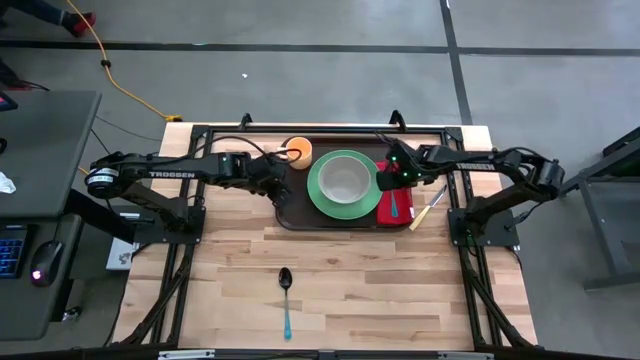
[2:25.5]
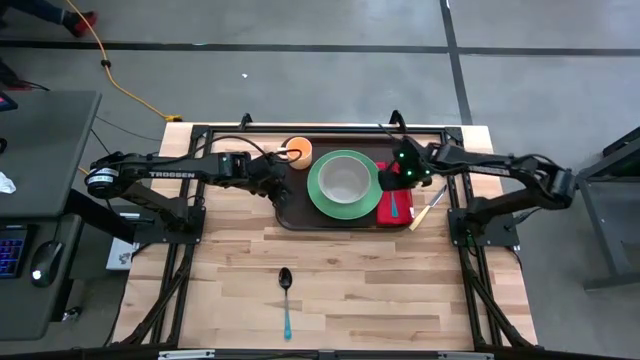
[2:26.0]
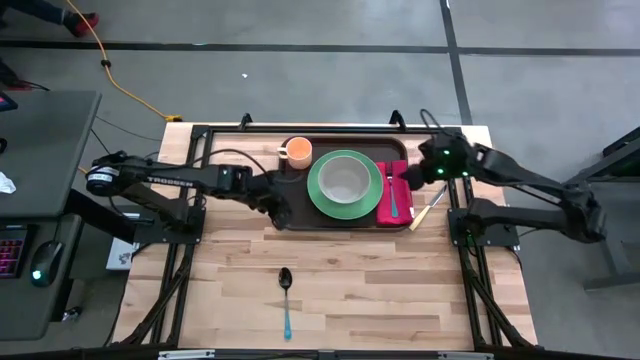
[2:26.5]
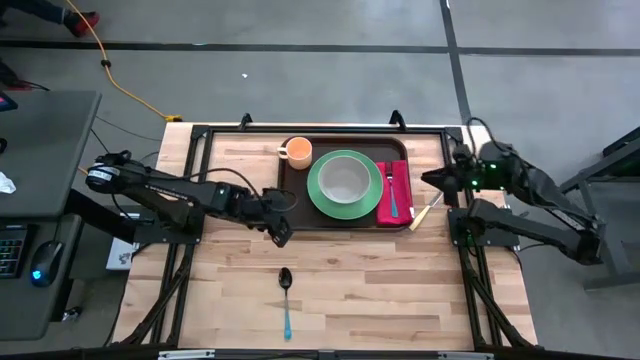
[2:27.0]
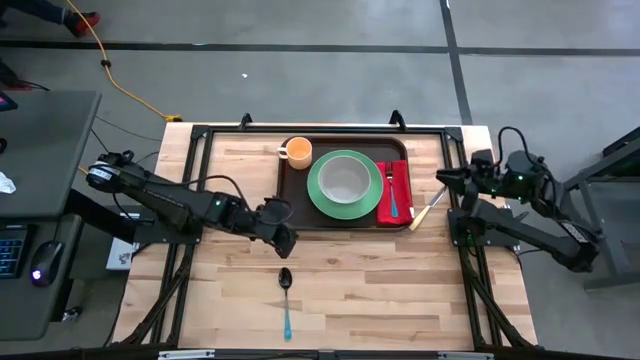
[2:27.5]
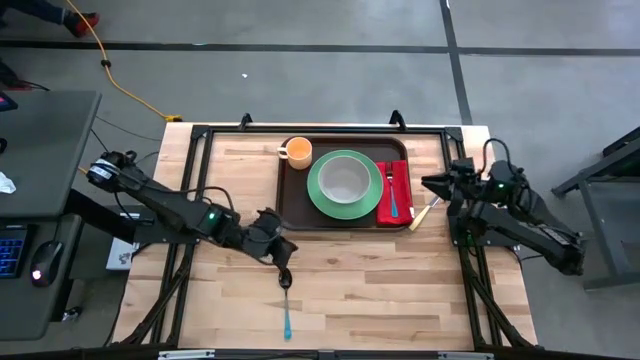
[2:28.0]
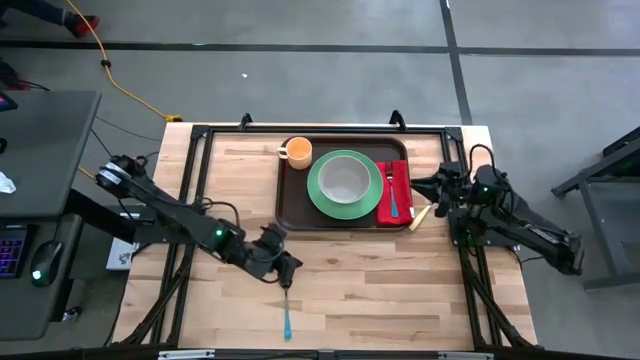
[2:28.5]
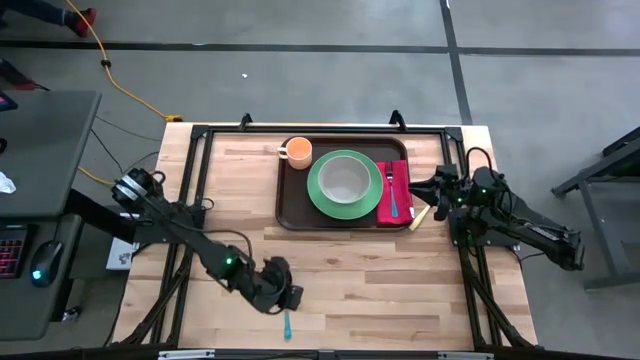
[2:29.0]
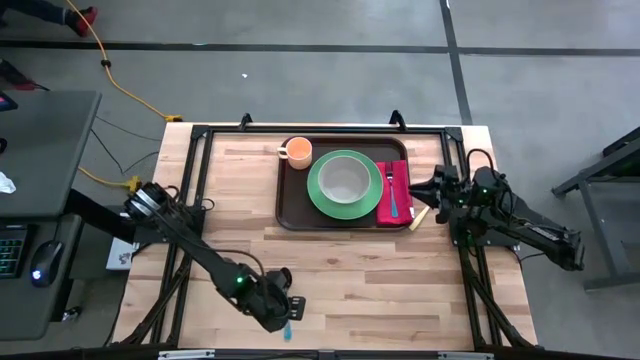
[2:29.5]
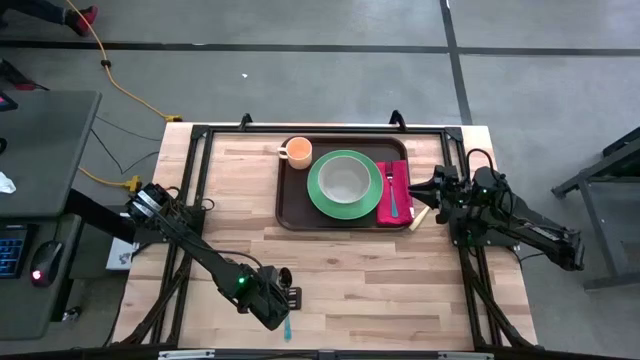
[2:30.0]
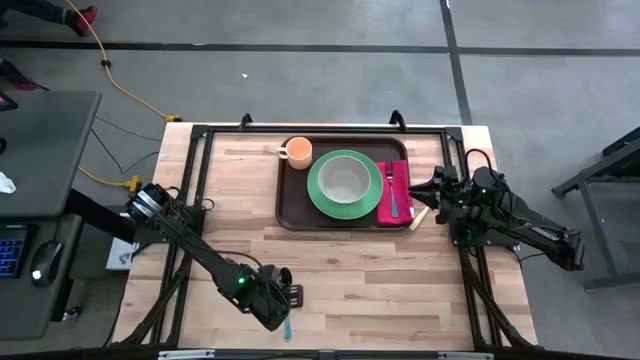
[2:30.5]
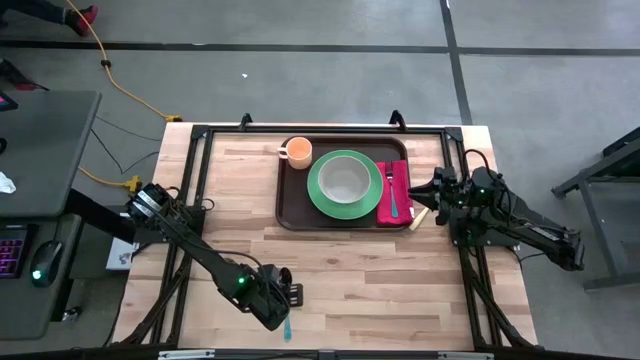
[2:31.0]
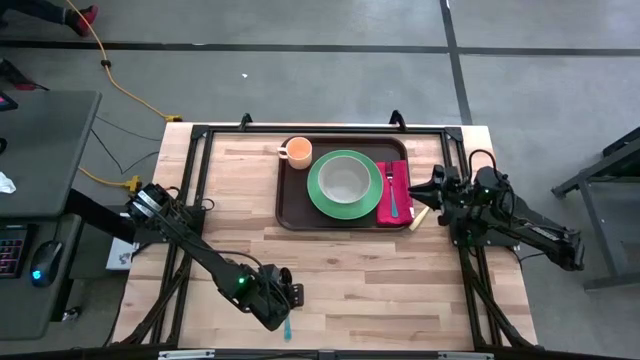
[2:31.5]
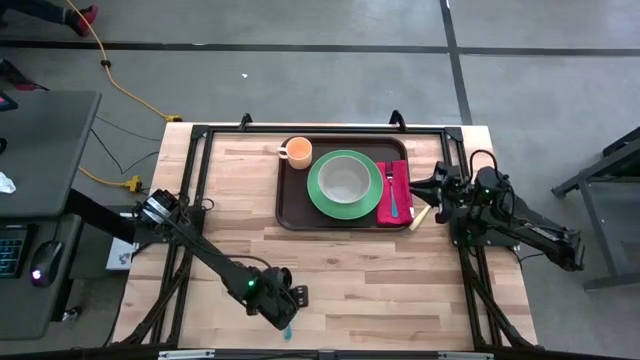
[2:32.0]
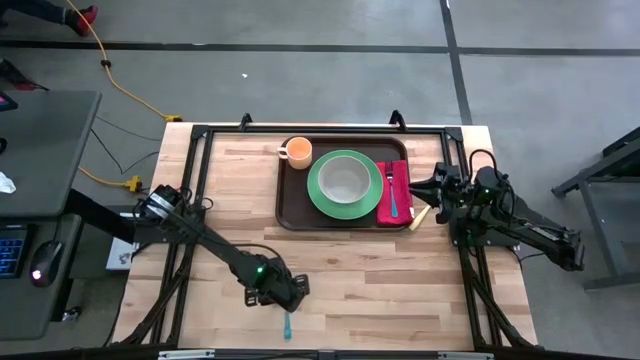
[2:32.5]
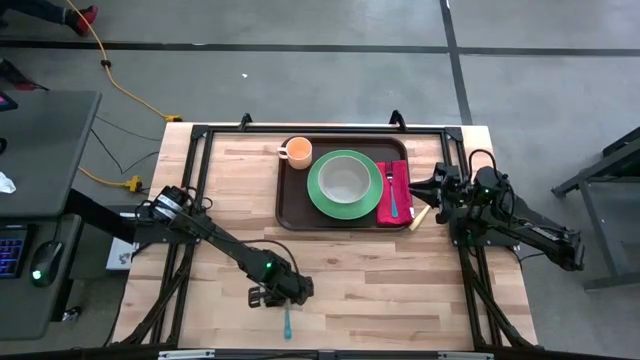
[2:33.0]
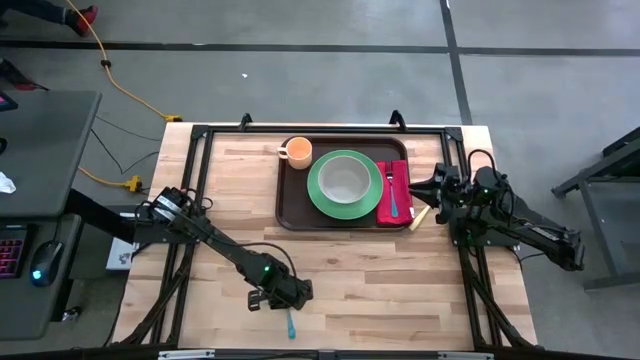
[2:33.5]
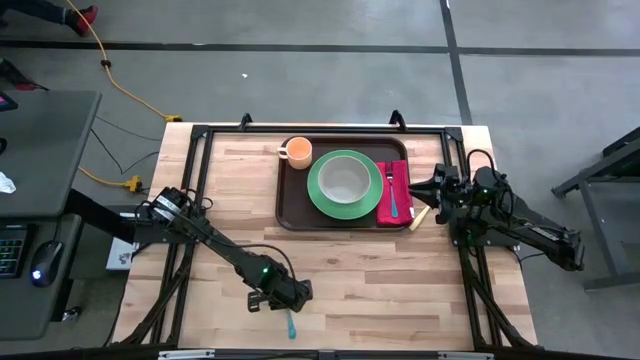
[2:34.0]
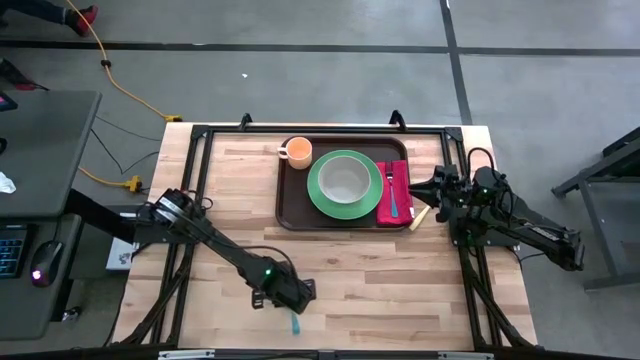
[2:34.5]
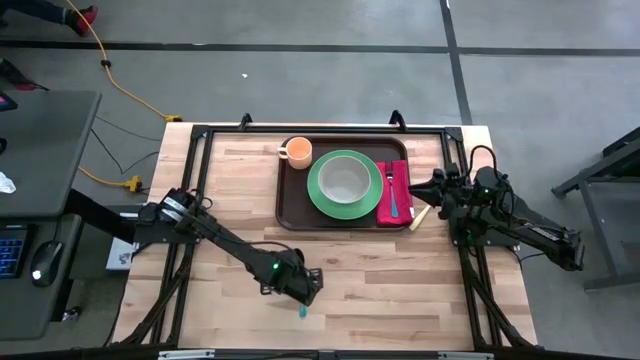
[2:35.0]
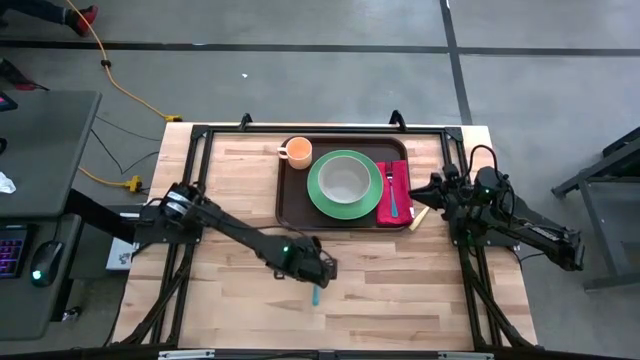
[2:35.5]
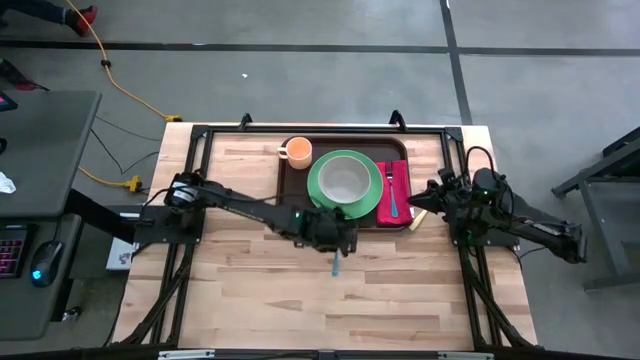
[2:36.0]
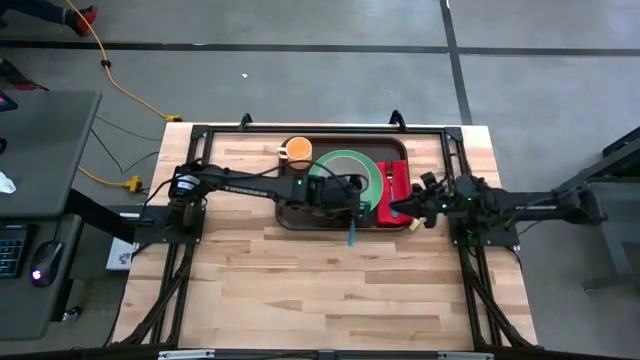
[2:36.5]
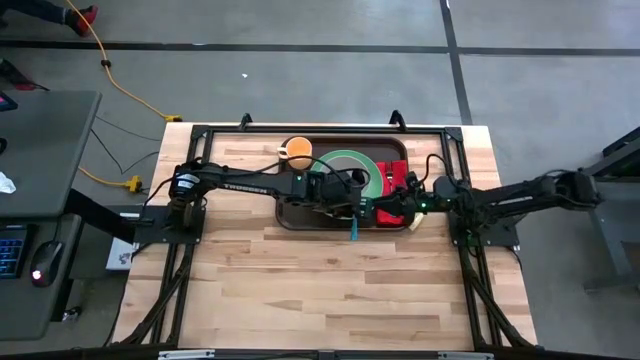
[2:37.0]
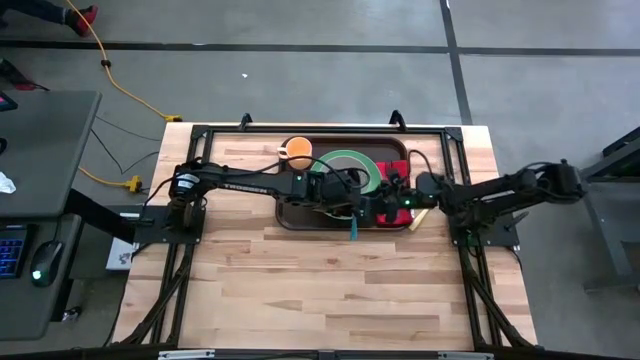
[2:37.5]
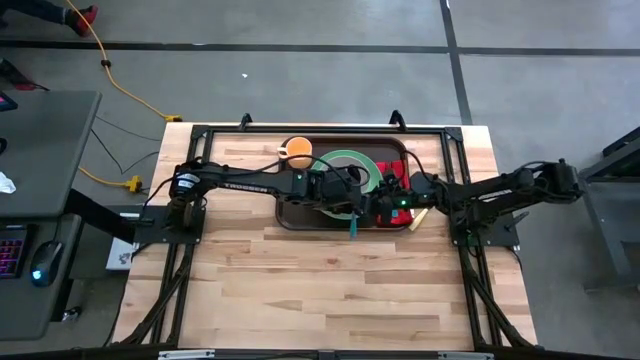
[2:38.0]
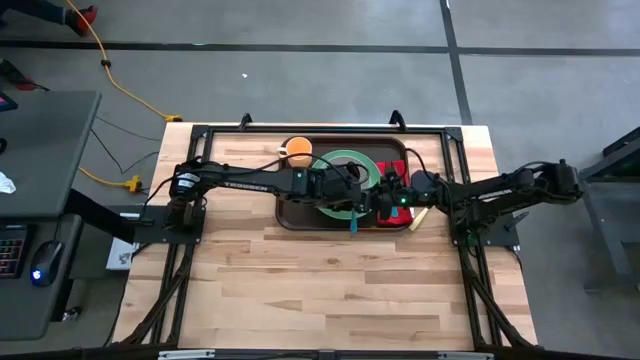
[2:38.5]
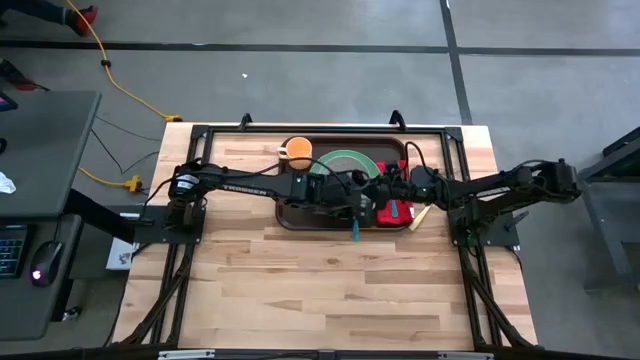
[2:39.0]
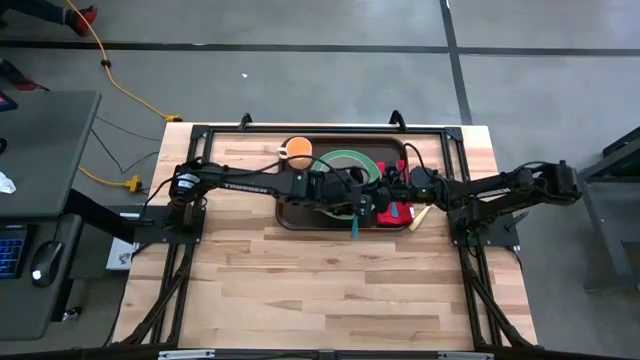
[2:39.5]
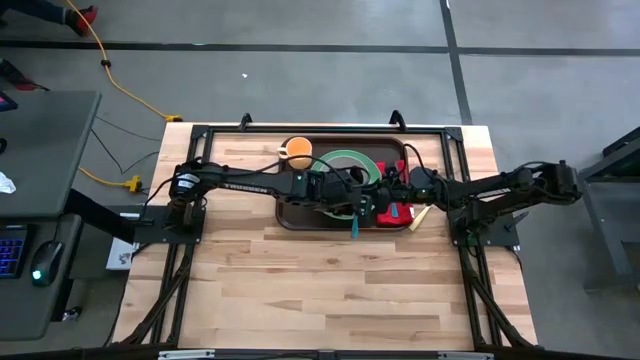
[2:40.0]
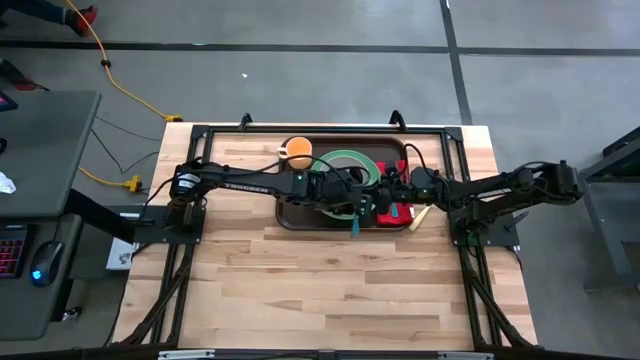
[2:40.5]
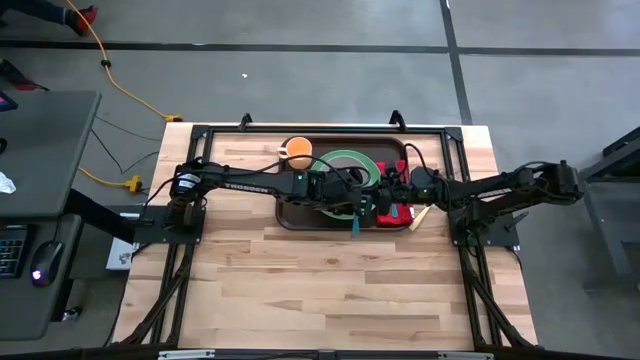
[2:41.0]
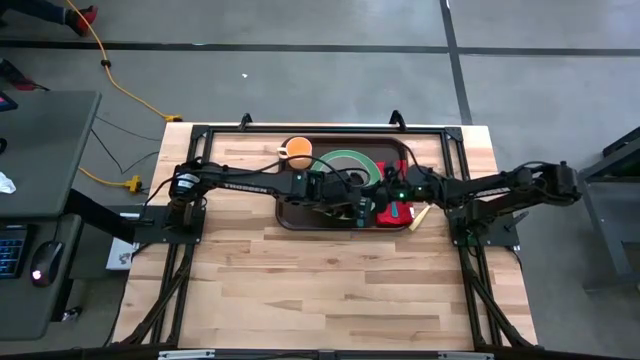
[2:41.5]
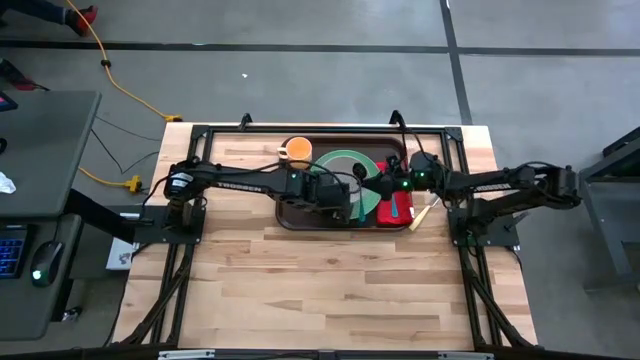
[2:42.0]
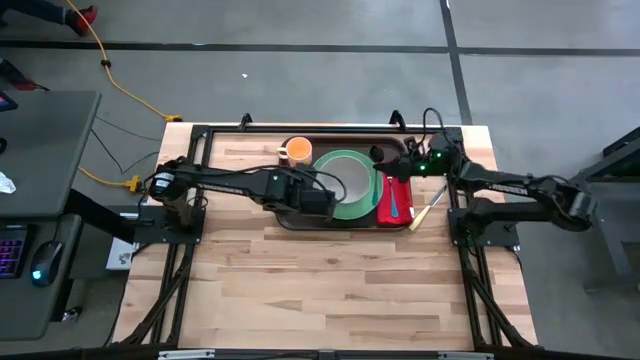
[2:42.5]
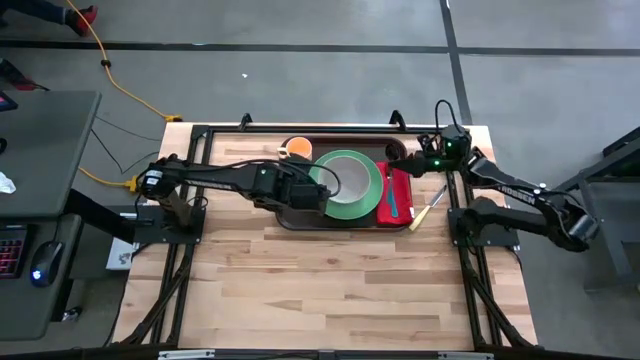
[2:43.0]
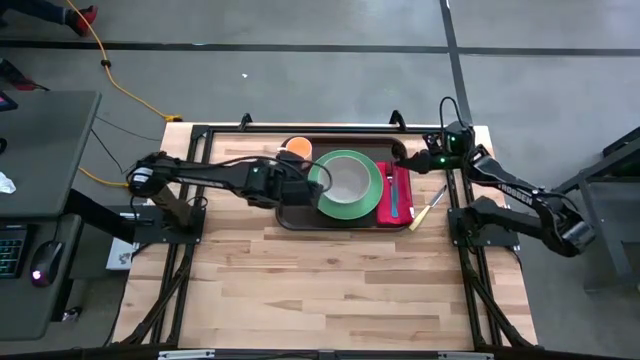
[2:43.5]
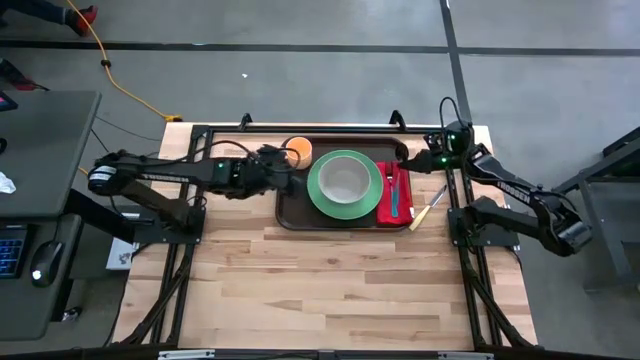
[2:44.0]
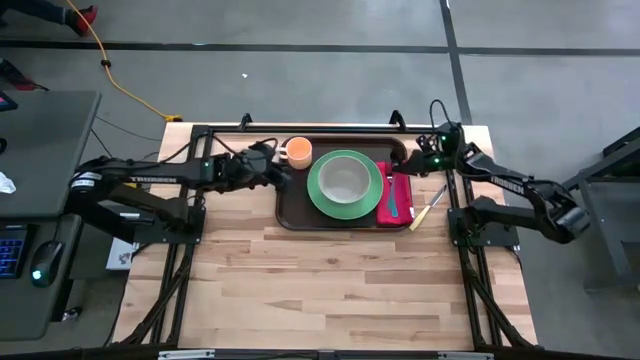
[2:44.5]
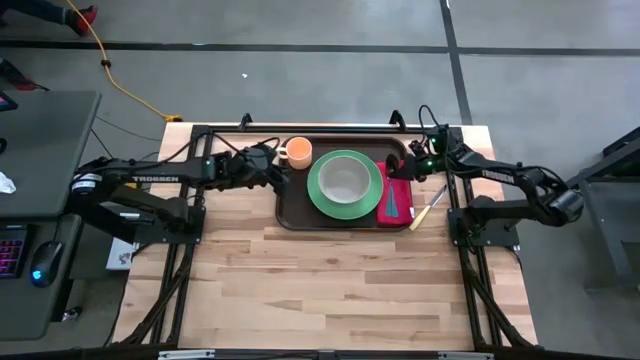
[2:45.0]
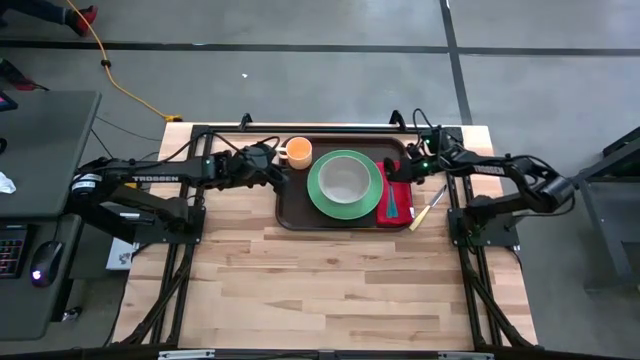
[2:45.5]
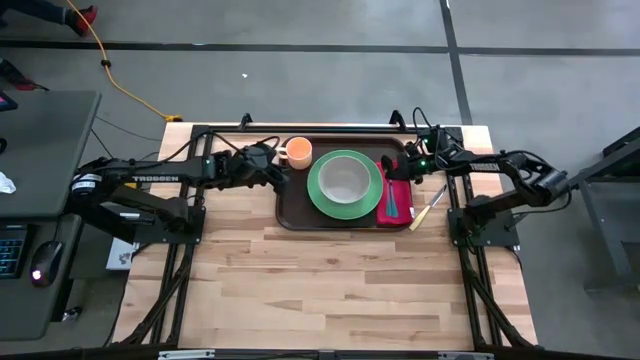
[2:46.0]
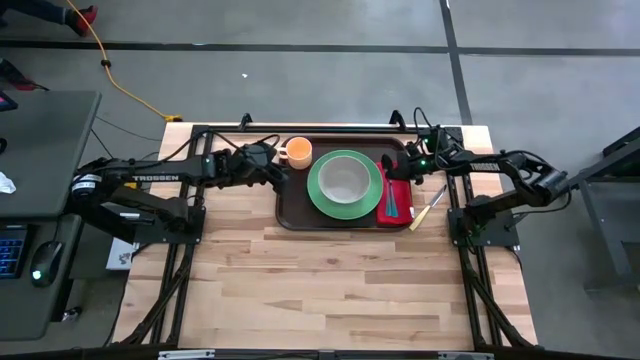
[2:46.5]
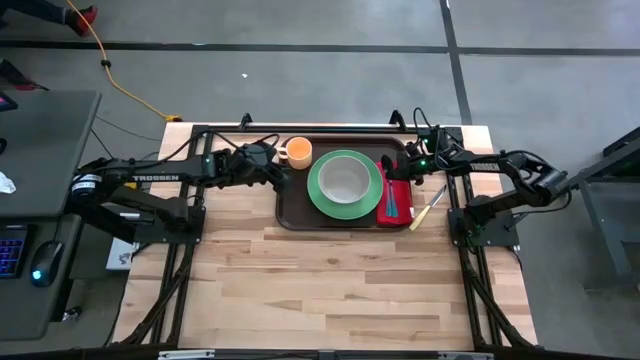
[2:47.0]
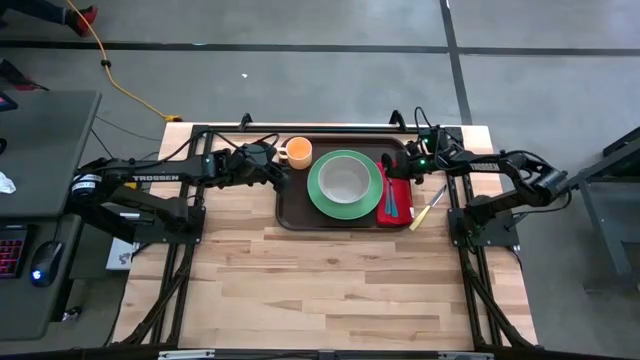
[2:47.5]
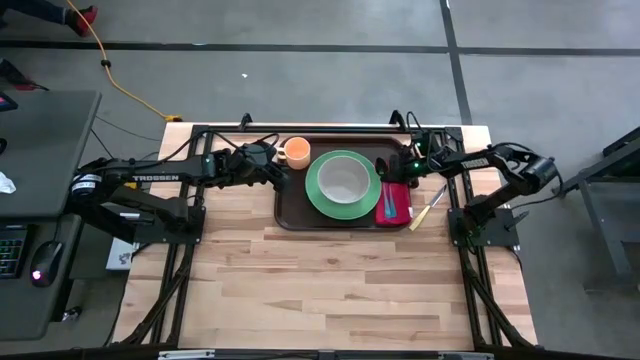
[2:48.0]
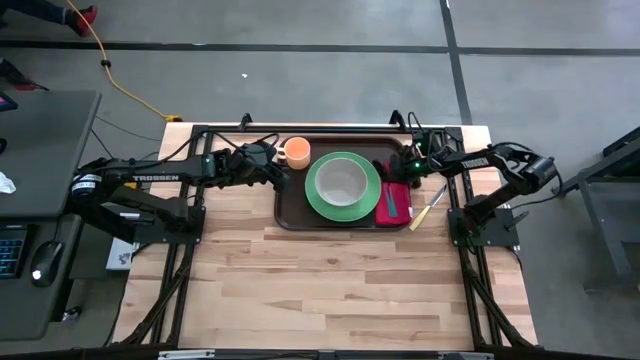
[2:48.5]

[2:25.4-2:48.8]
Task: Set up tray
Put the blue spoon on top of the red table napkin to the right of the green plate on the brown tray
